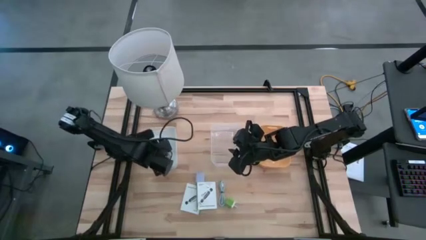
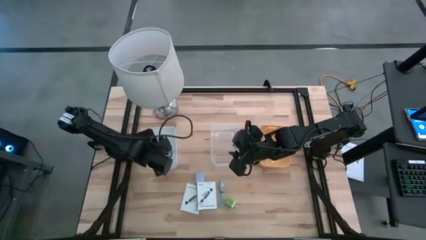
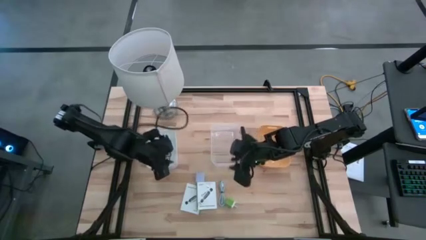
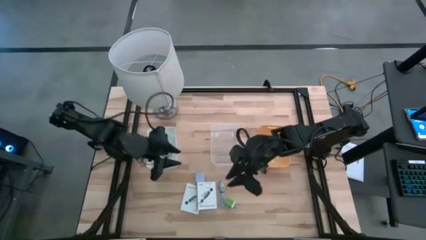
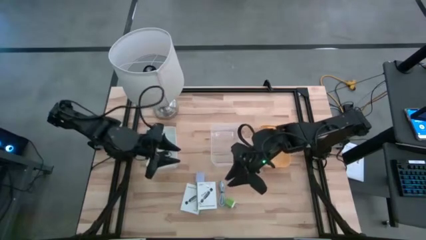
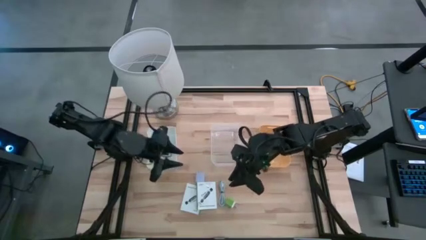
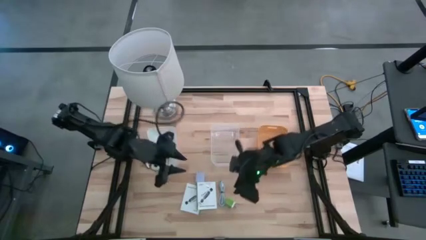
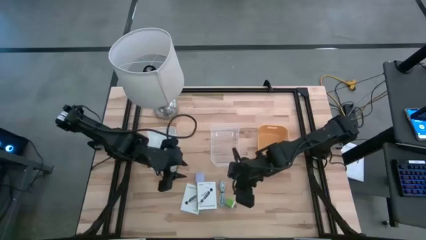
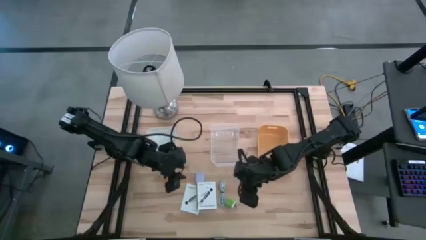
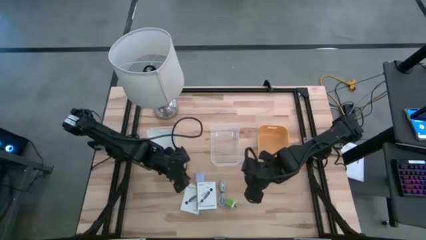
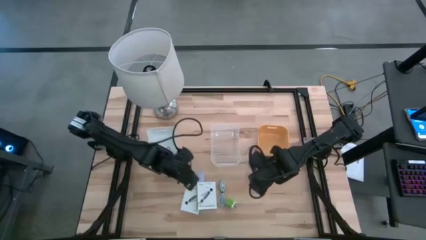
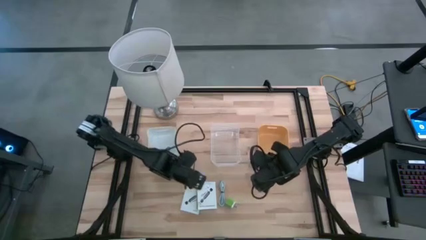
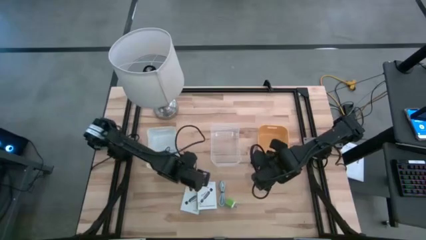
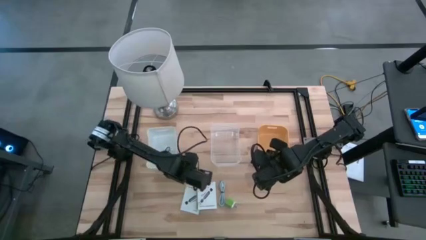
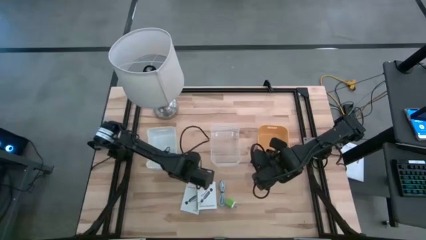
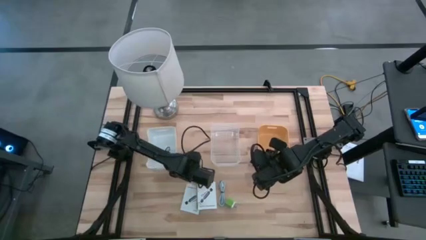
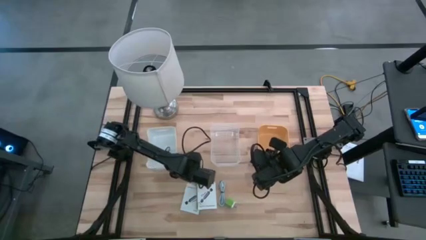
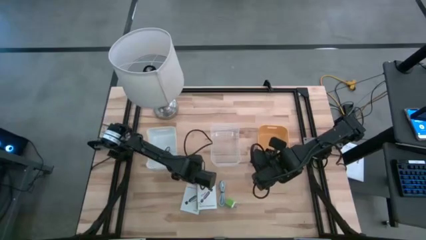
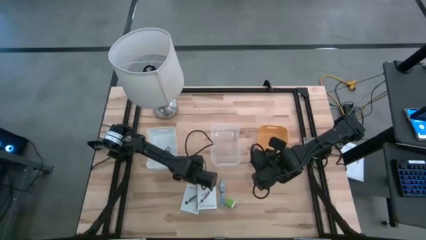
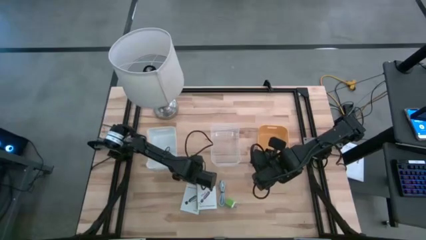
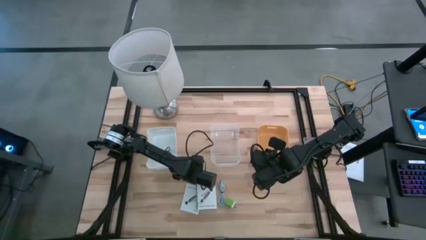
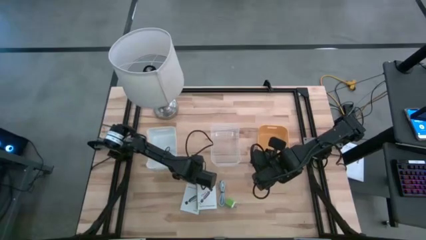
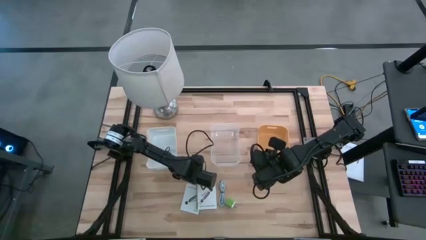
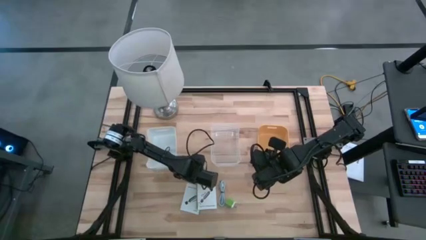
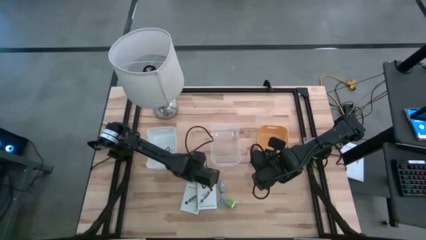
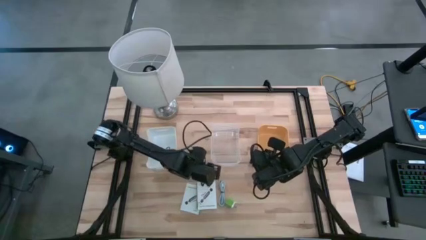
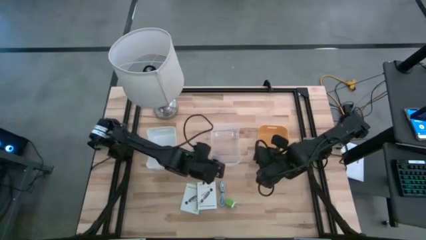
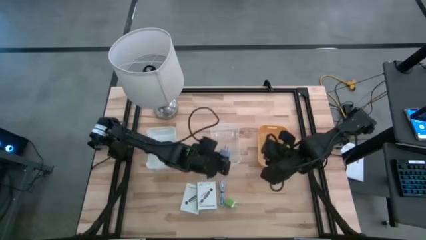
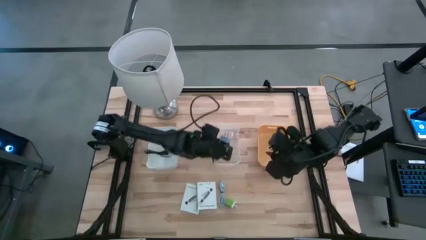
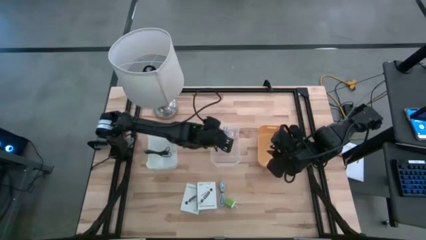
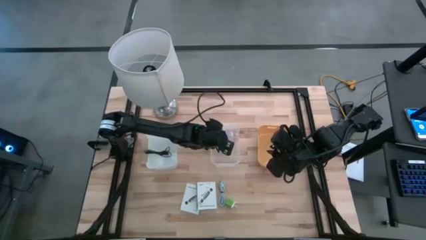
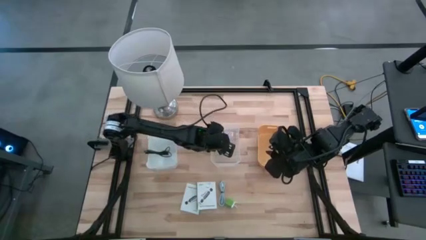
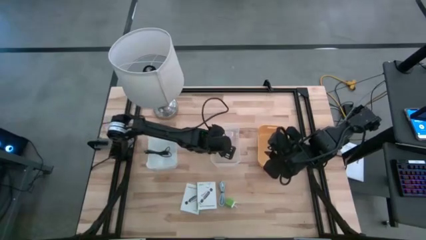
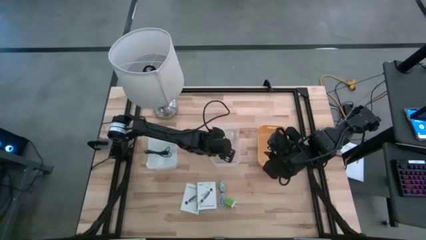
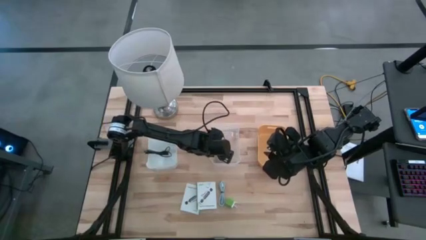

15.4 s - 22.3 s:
Task: Pick and place items into bin
Put the light blue charger adapter into the transparent bin

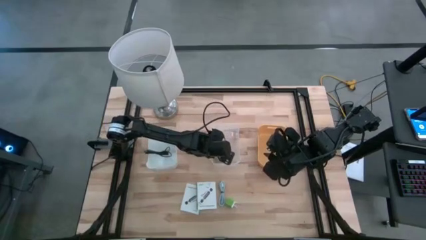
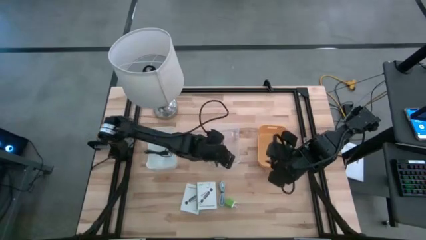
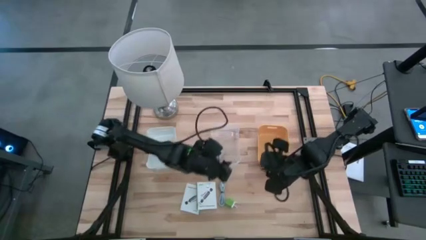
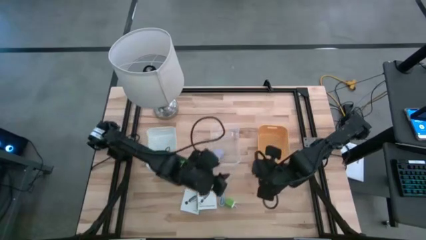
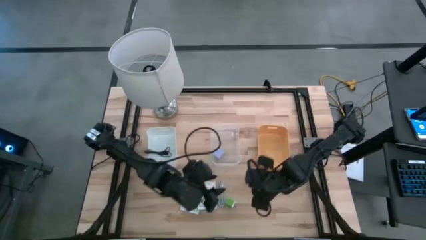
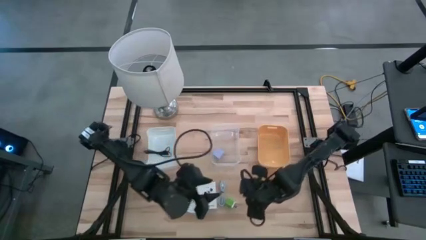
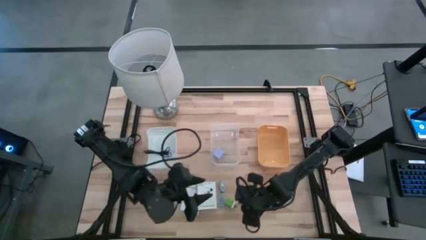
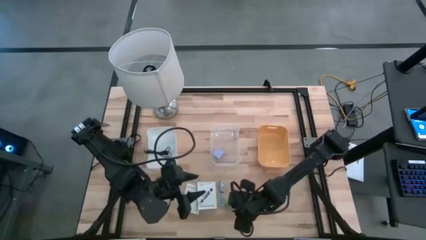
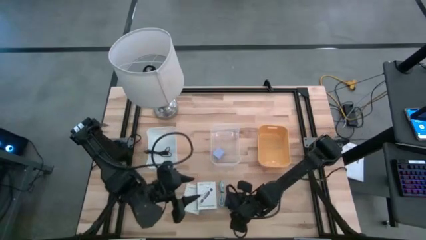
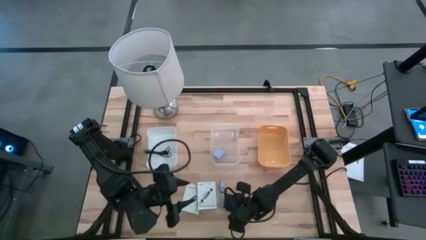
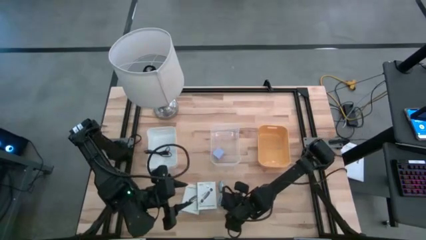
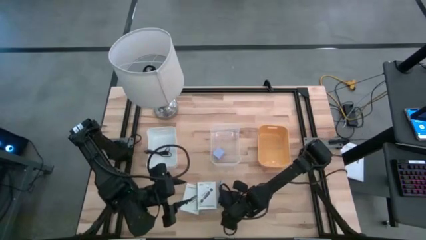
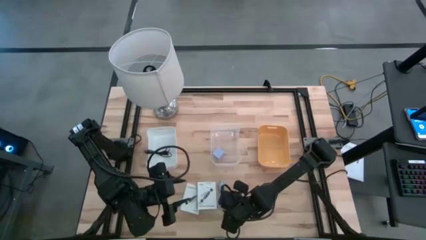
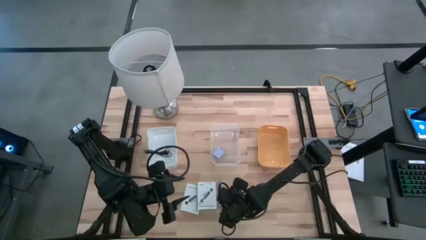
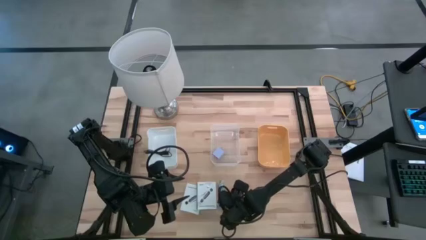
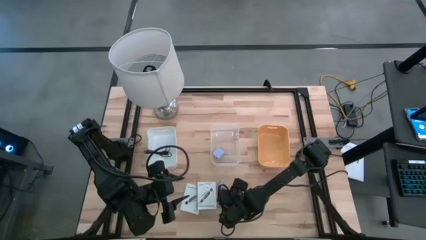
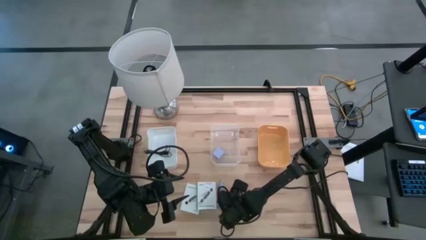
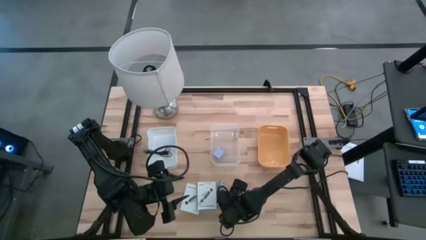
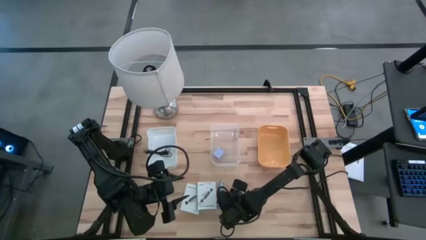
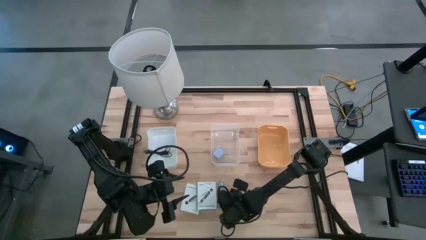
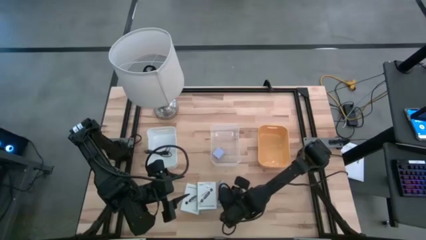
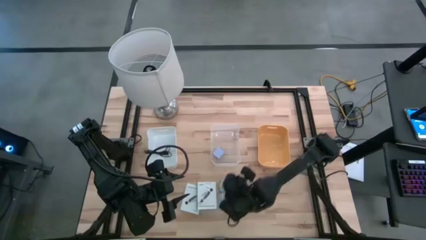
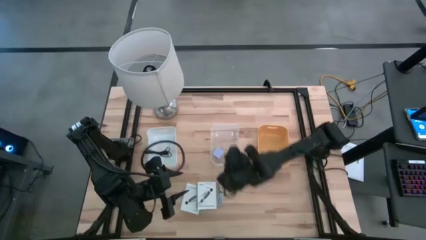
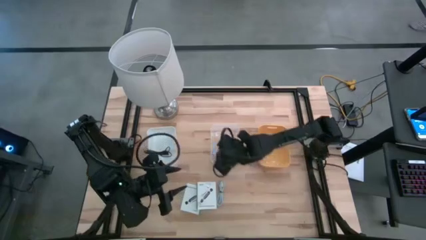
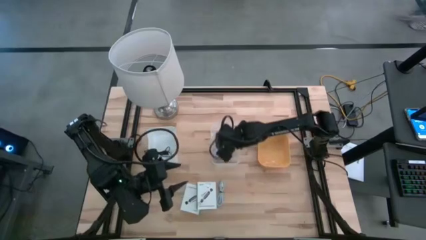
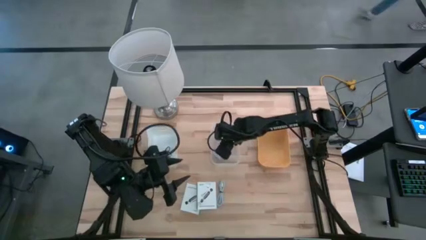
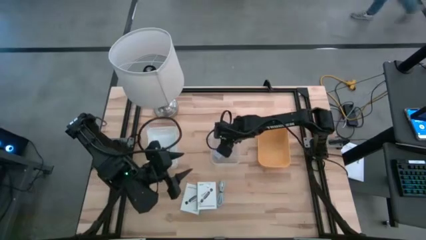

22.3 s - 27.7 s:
Put the green charger adapter into the transparent bin
